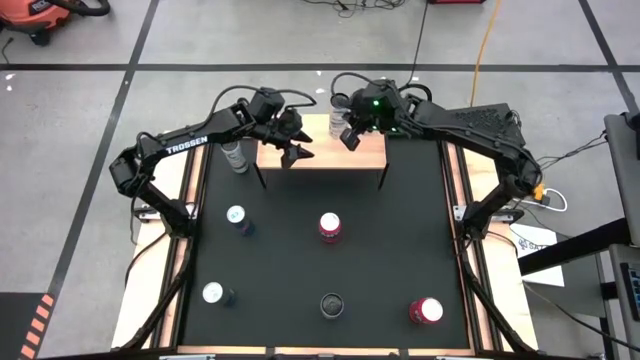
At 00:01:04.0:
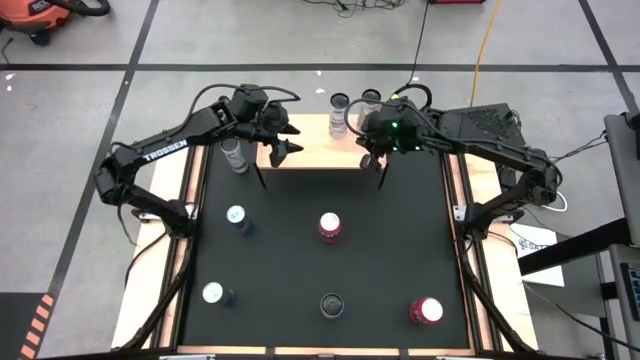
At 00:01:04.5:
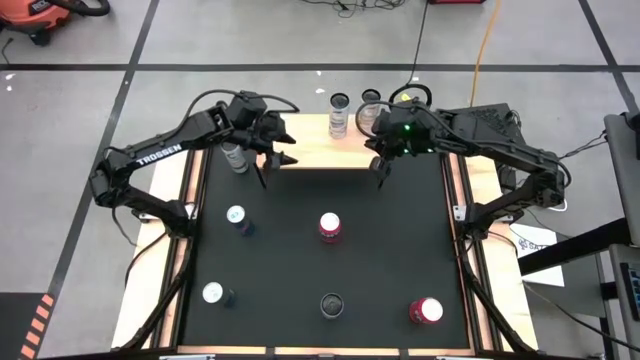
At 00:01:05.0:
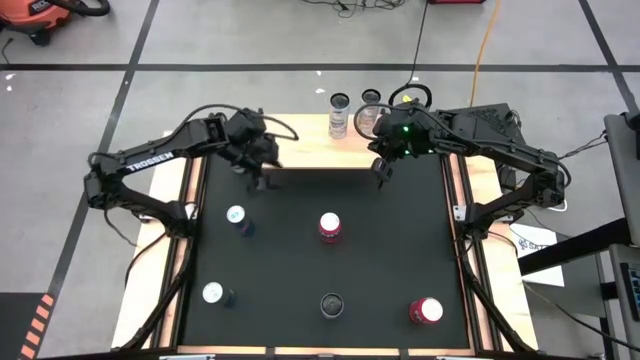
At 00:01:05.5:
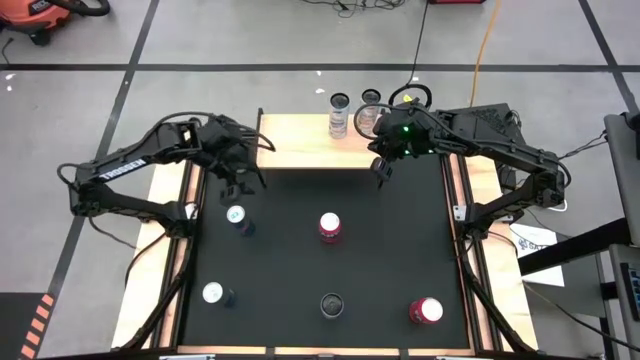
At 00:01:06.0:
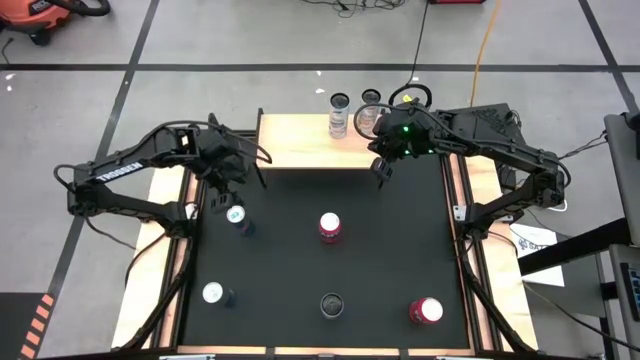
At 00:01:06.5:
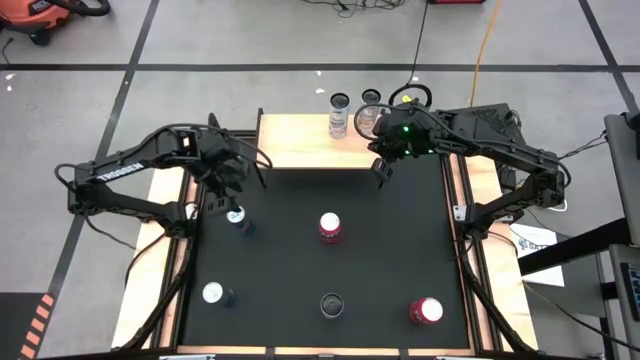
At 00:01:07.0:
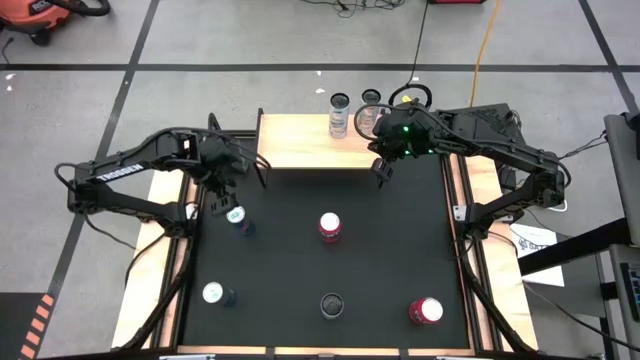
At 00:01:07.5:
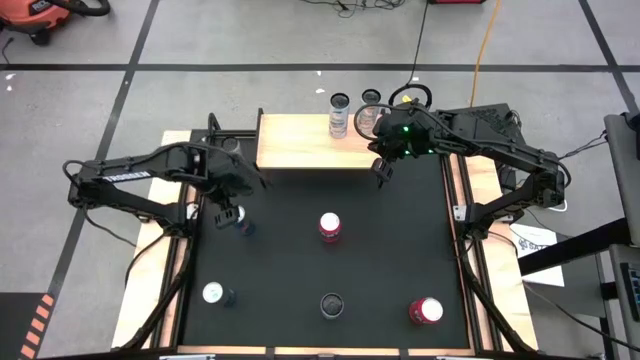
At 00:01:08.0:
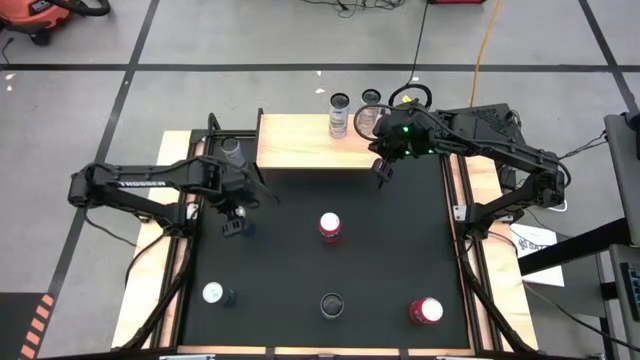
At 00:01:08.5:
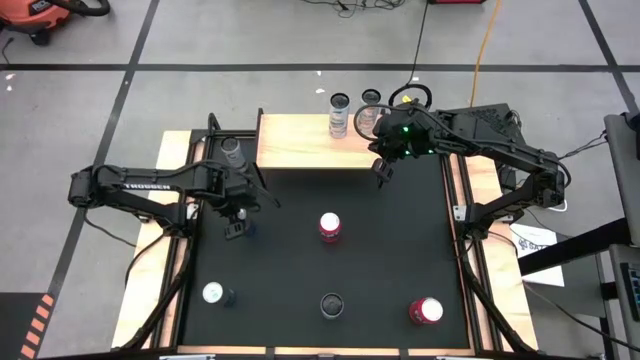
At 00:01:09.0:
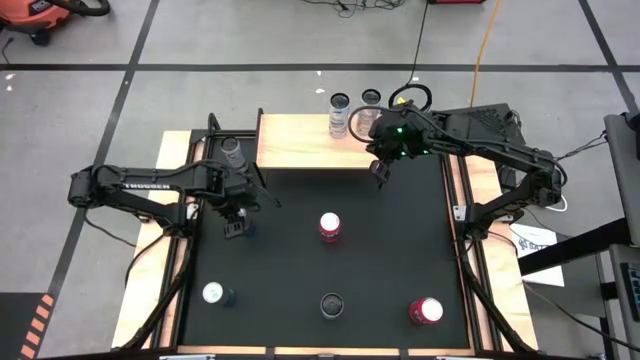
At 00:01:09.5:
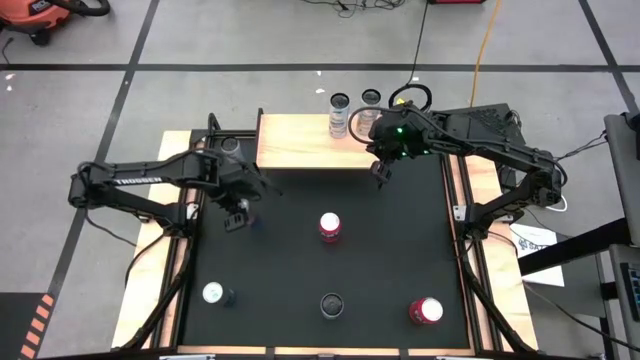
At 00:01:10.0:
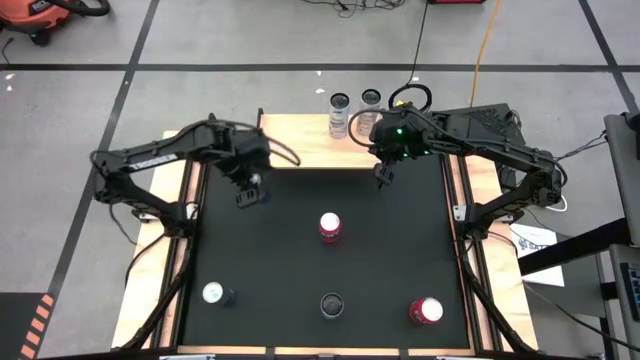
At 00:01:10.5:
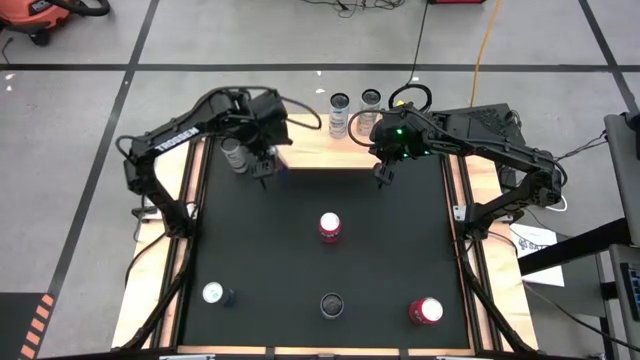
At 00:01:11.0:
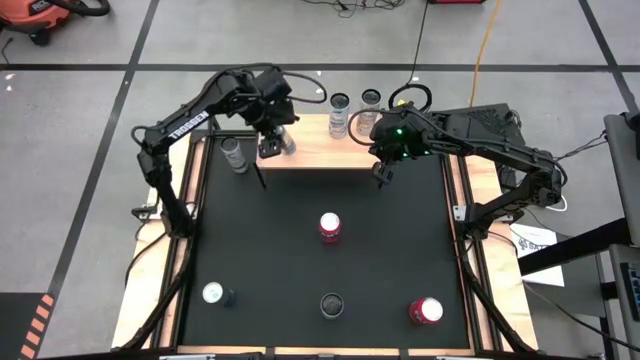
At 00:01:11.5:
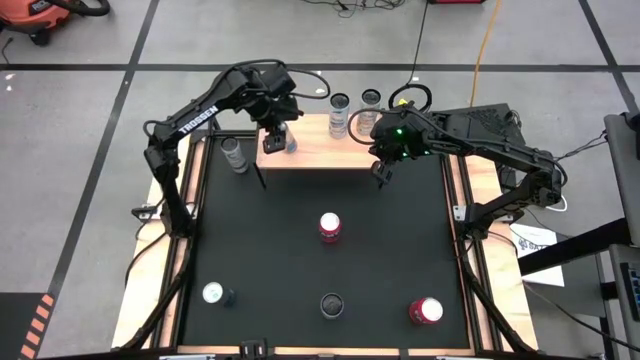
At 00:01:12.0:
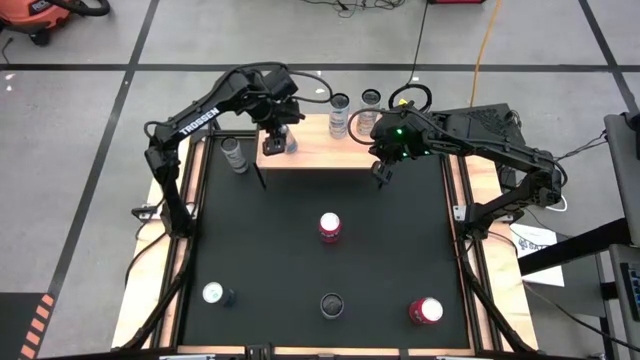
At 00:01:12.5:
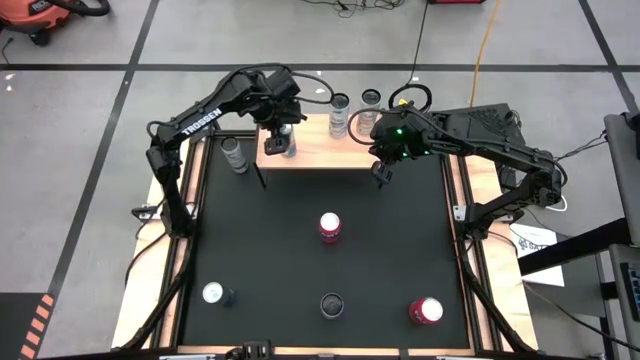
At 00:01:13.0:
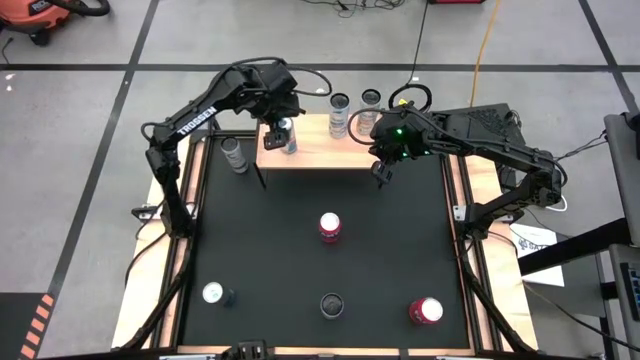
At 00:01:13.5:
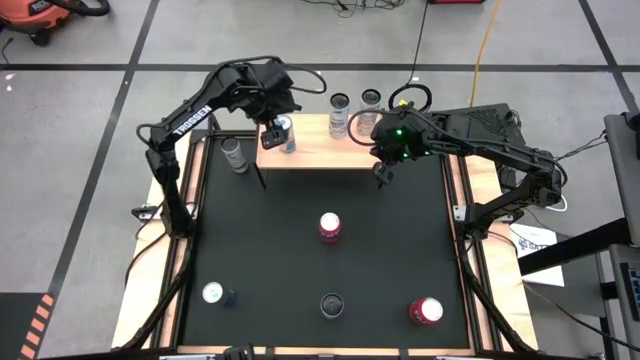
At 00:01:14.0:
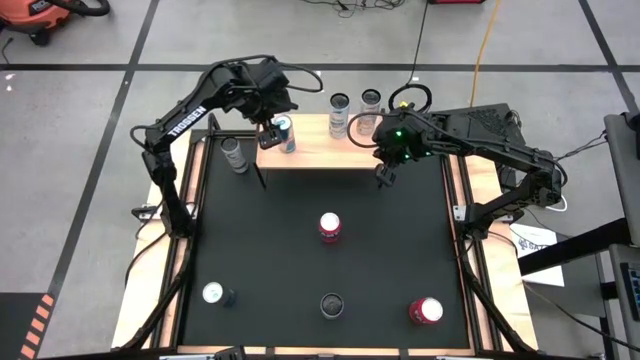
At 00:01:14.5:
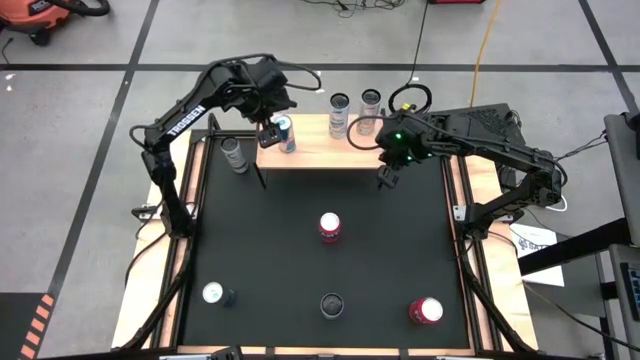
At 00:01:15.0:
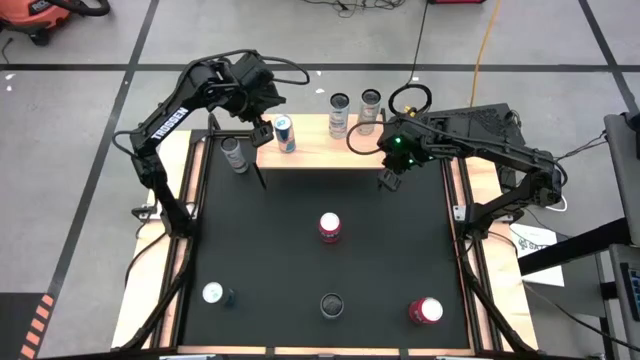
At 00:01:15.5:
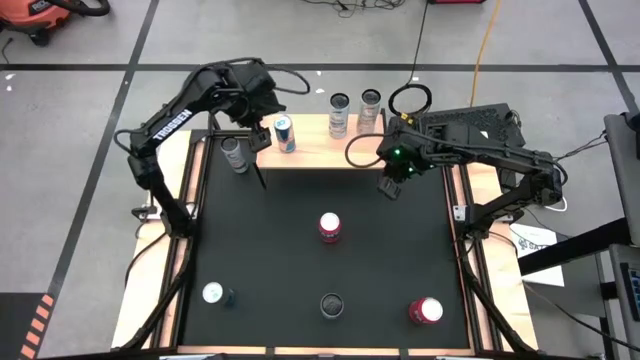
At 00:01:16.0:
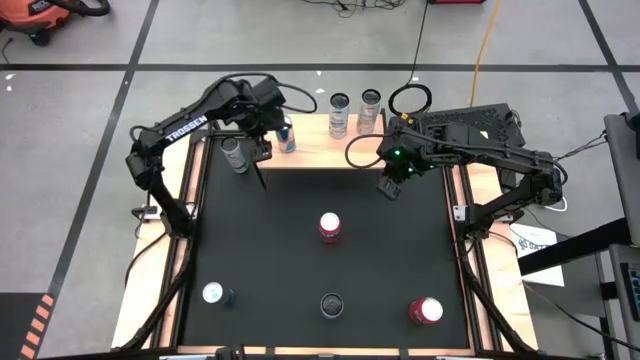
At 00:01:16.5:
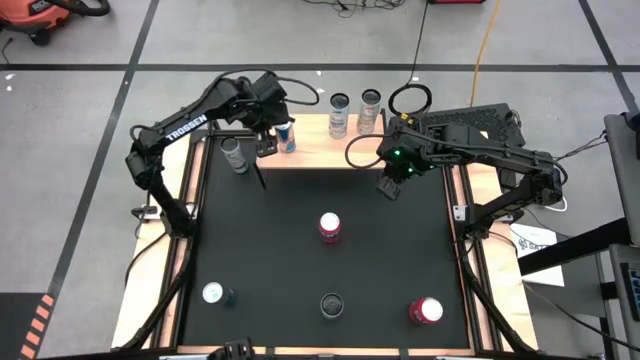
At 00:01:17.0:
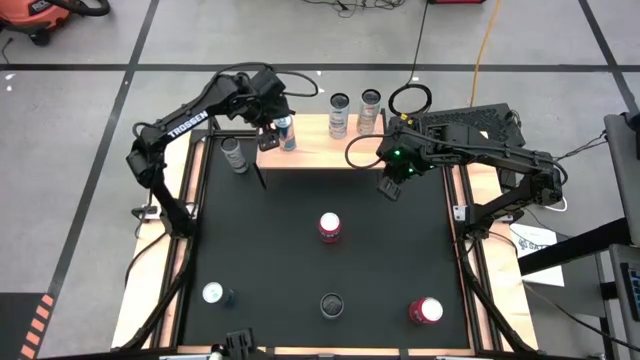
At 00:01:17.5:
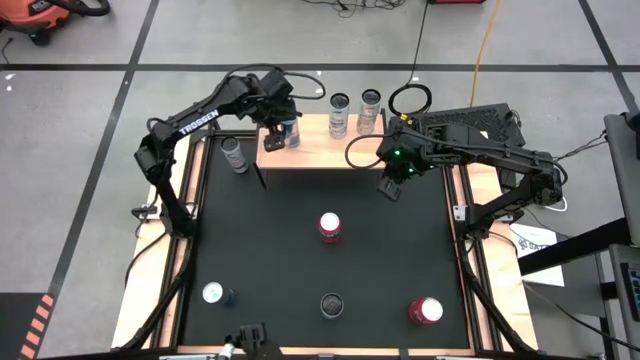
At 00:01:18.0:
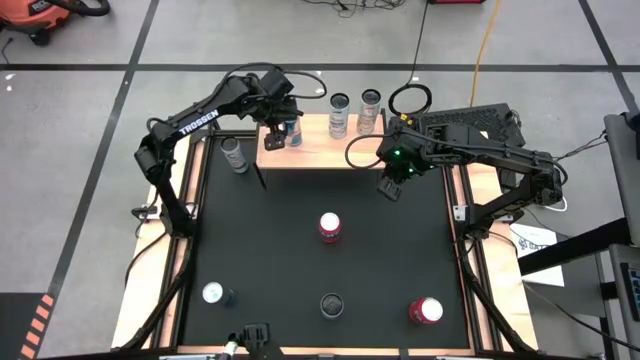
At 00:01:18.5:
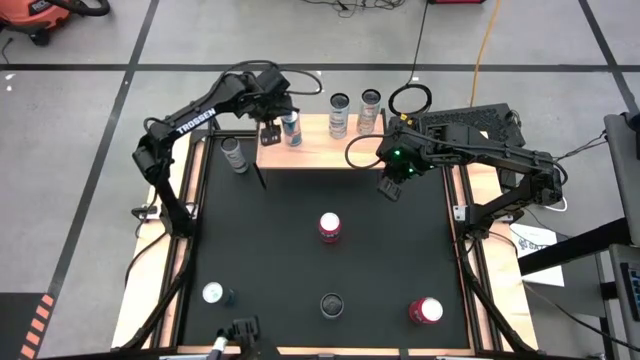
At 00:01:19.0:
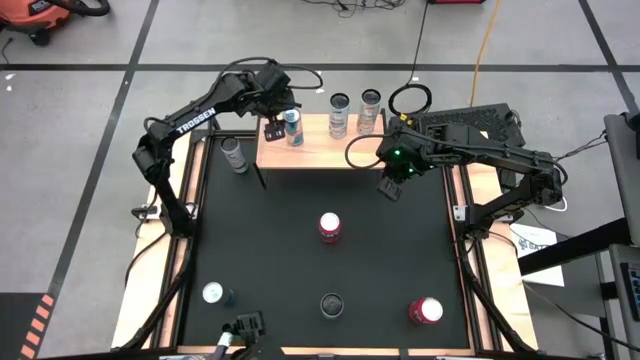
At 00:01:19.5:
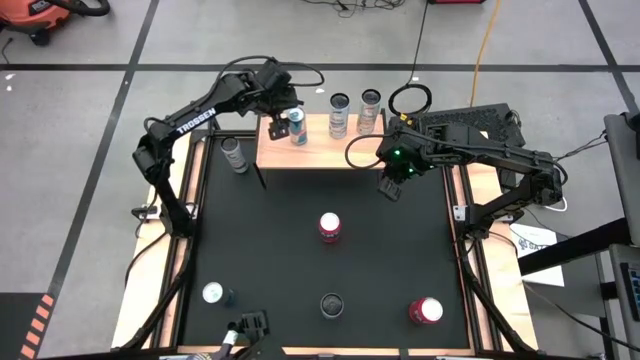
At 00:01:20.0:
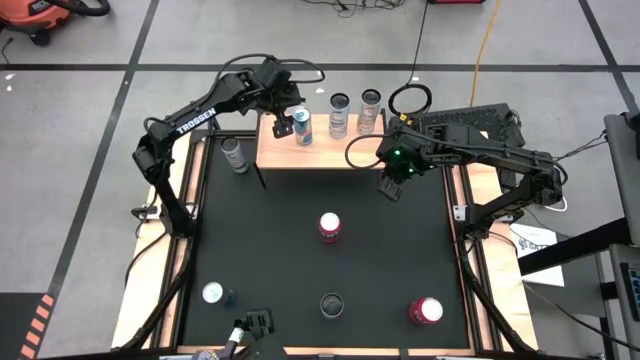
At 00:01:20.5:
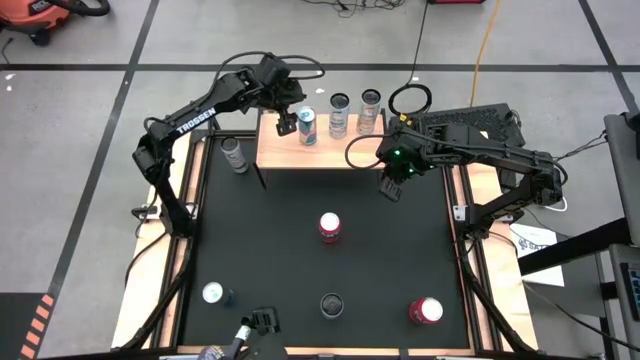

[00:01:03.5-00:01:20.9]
Task: Place canned beverage on shelf
Put the top blue soda can on the shelf

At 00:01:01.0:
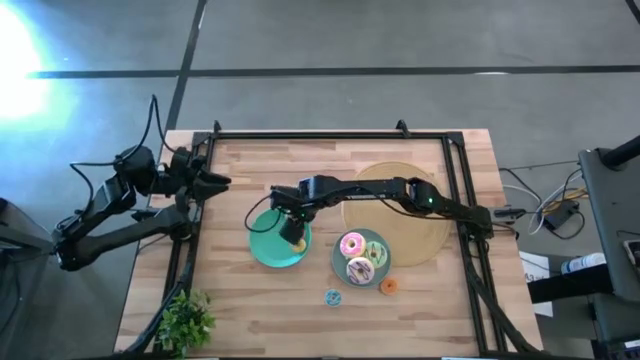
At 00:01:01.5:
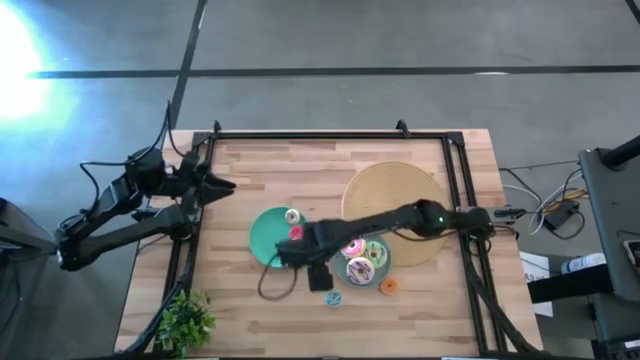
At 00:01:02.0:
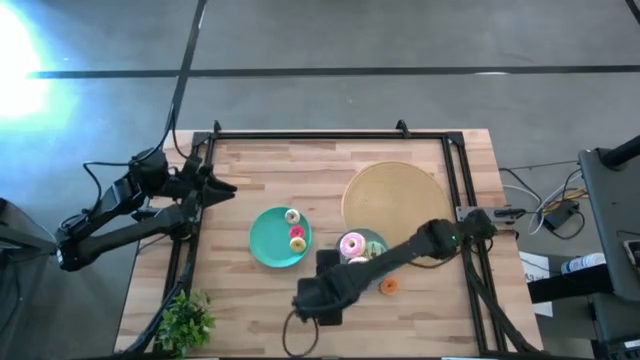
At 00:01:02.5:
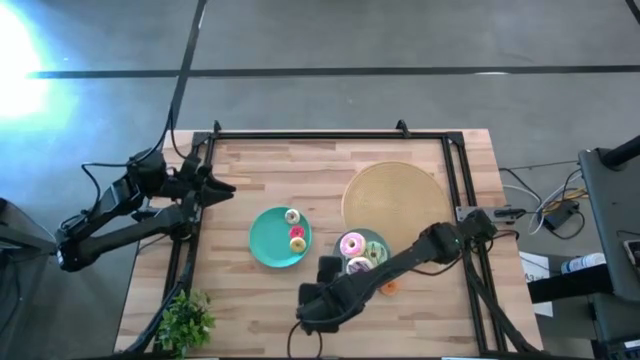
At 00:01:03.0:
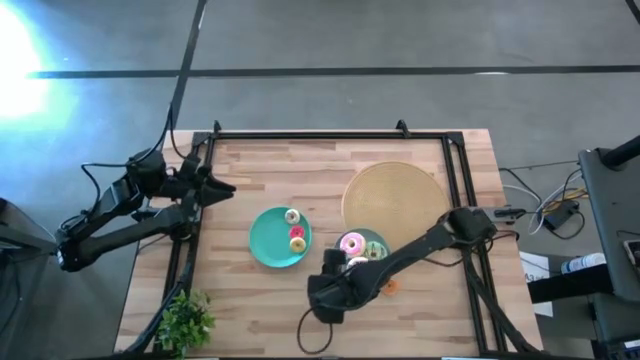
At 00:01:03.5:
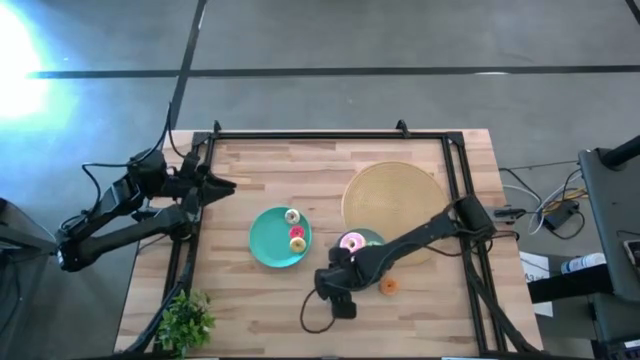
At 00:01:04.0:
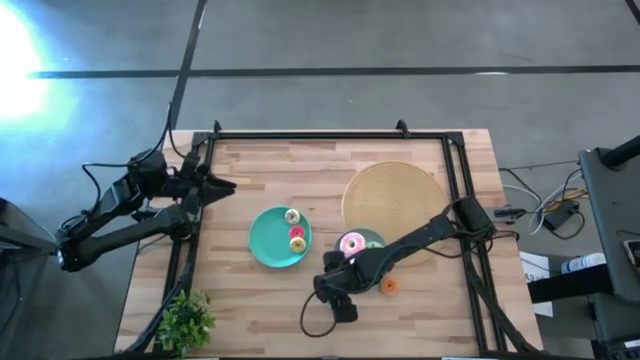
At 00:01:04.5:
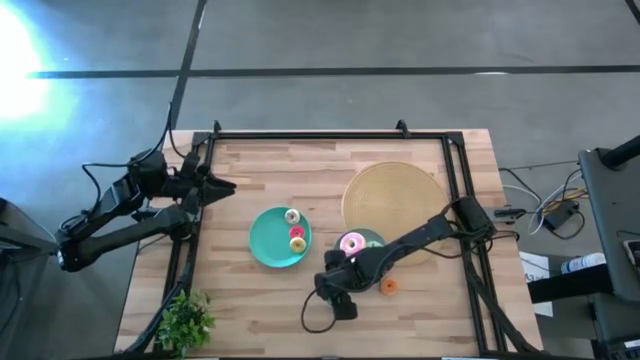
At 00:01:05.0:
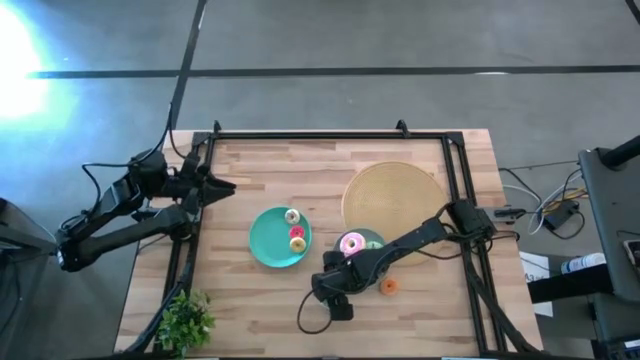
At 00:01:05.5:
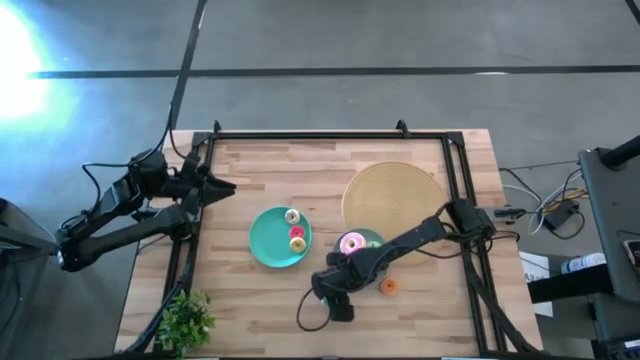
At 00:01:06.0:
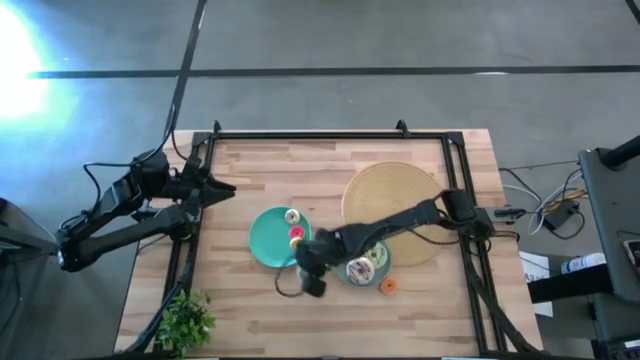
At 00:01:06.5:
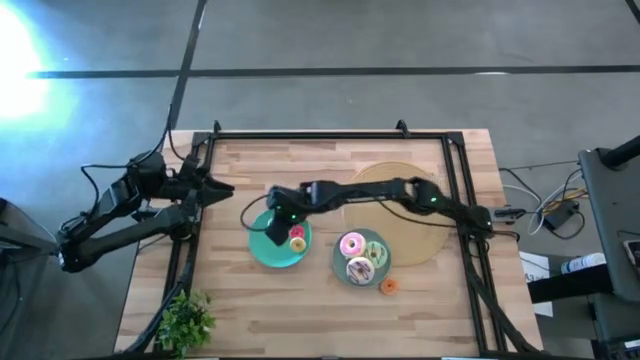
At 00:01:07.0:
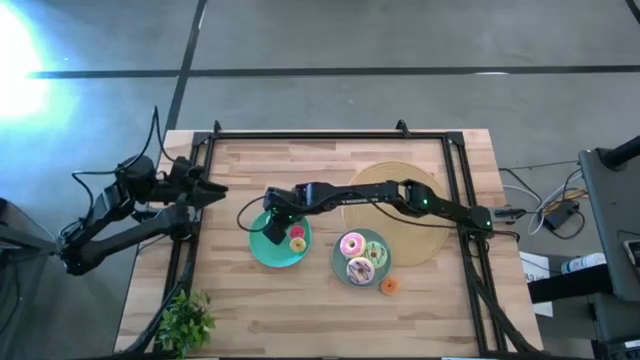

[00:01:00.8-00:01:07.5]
Task: Pick & Place donuts
Put the small blue donut on the green plate
